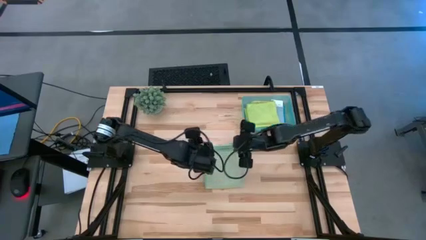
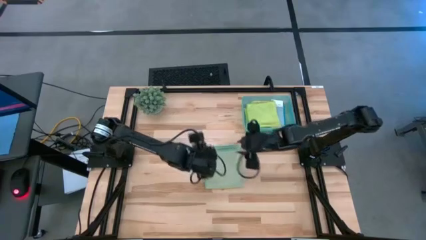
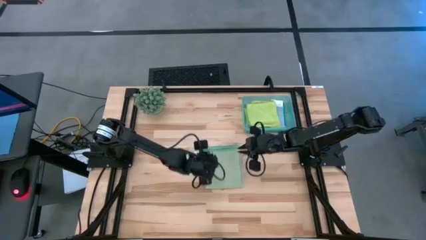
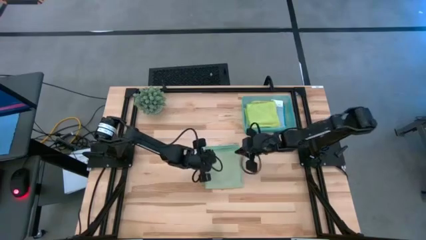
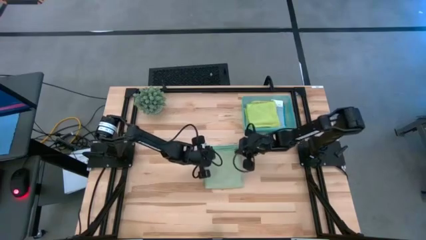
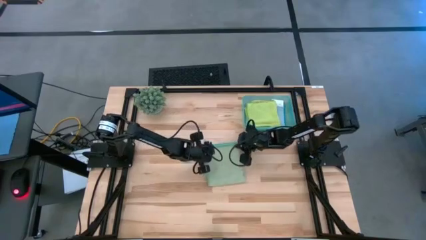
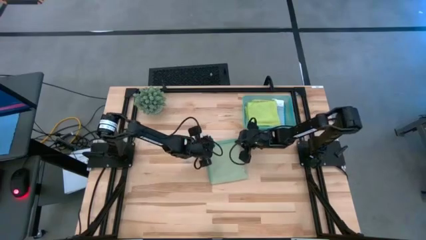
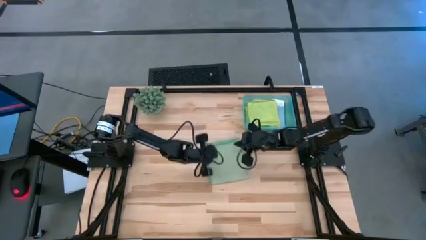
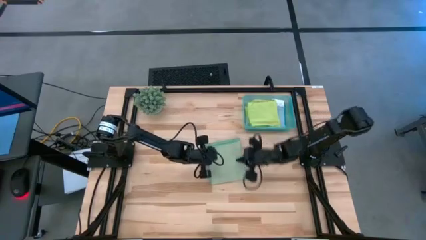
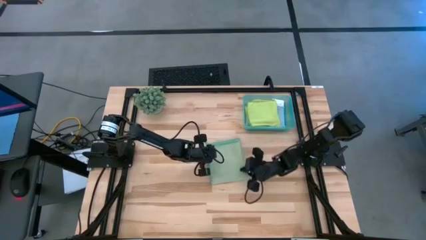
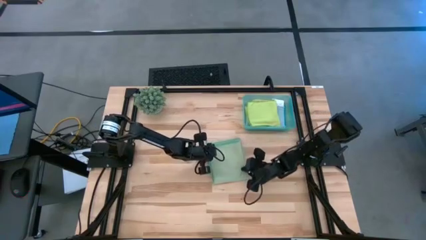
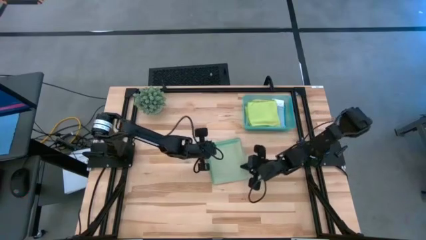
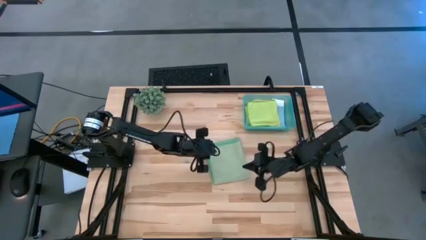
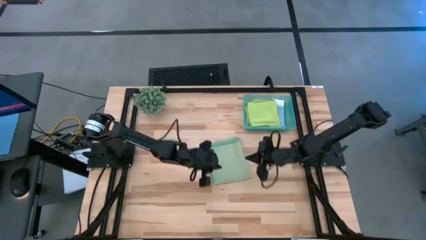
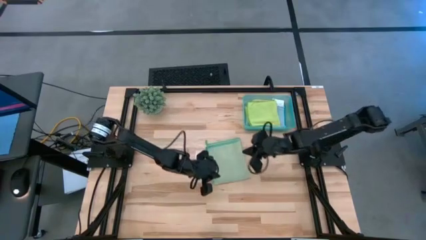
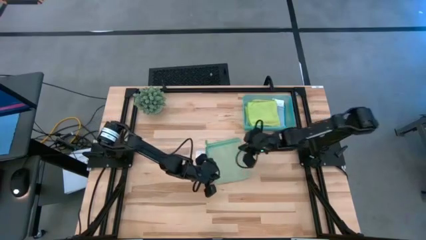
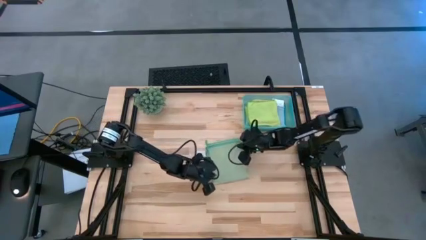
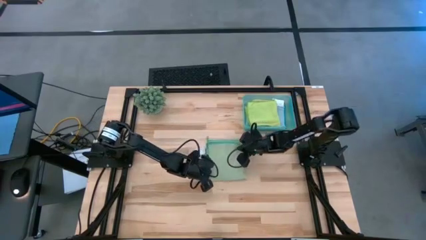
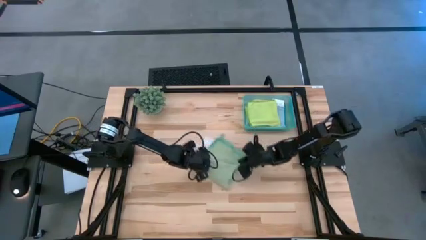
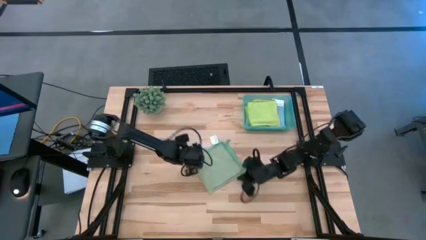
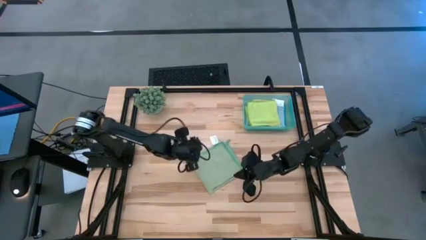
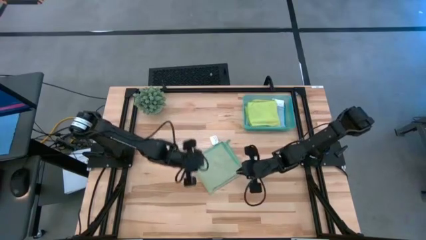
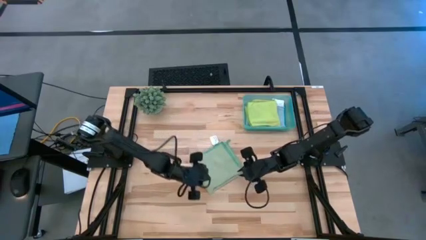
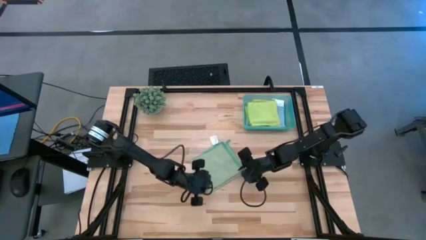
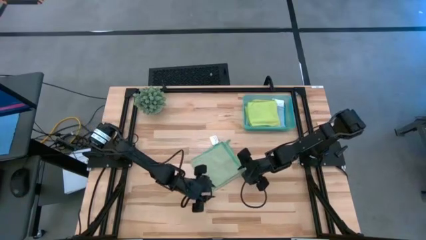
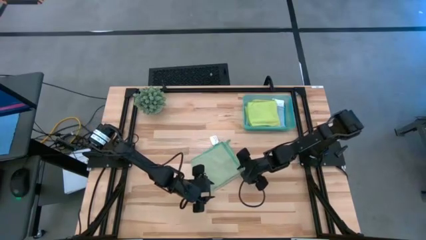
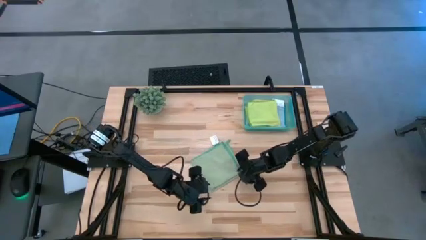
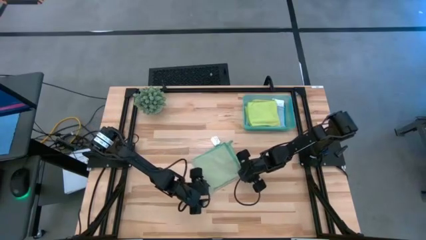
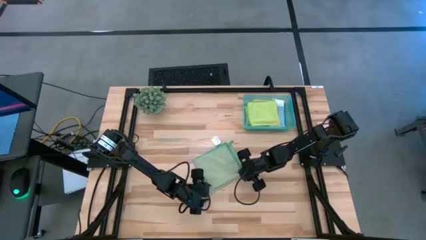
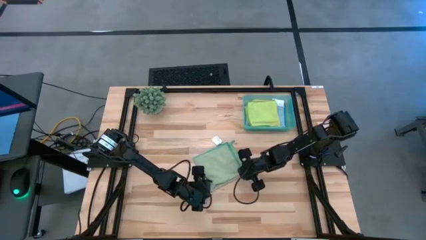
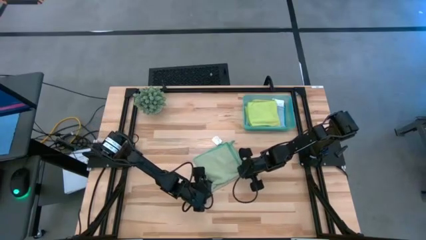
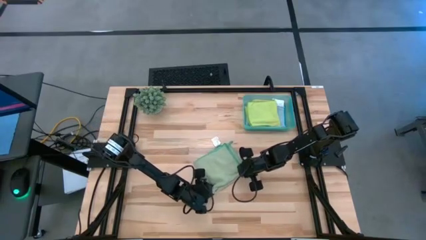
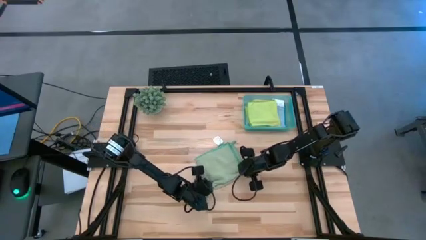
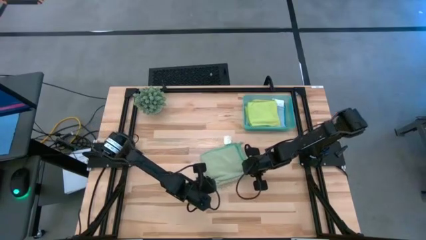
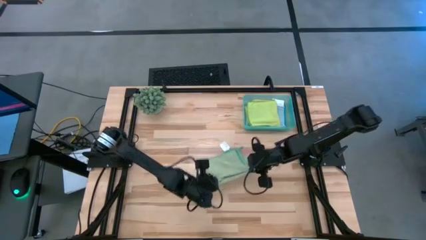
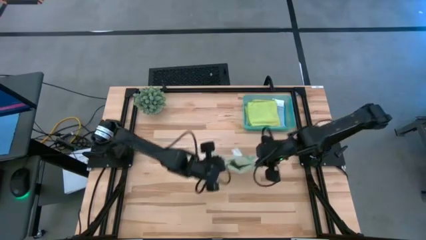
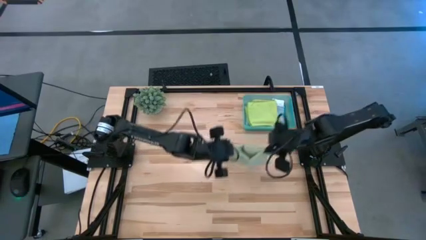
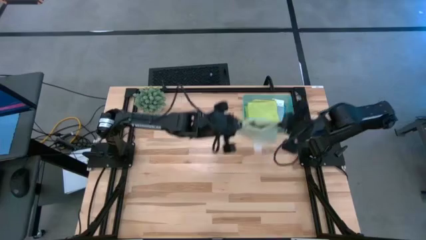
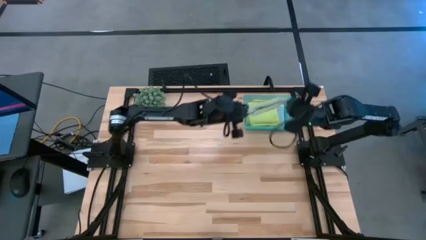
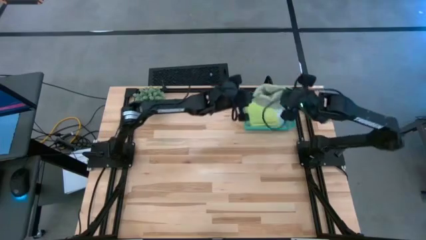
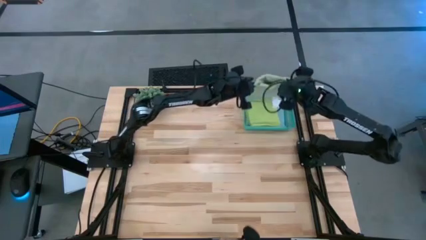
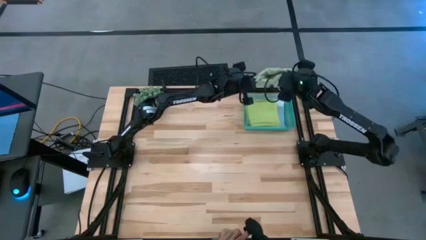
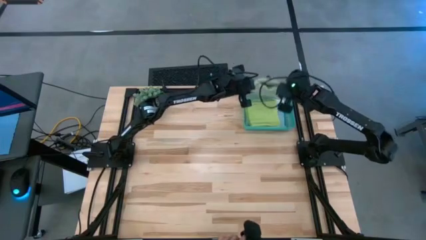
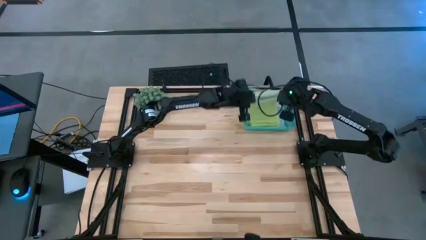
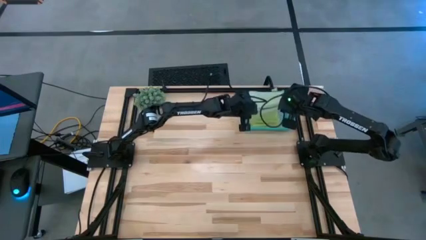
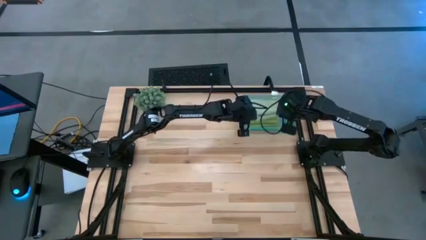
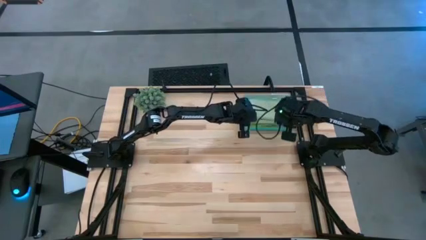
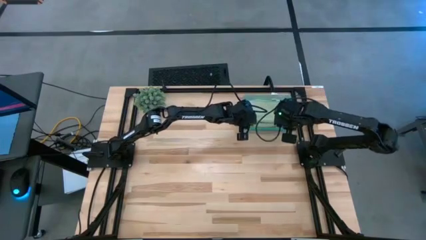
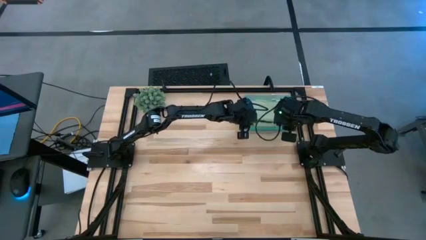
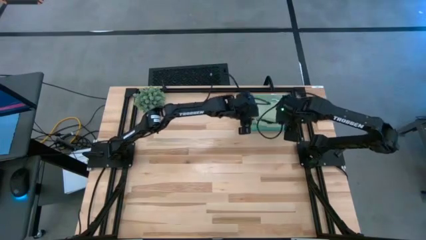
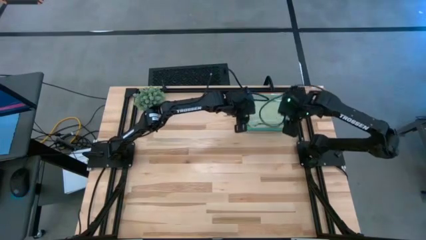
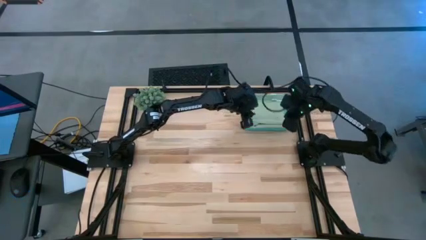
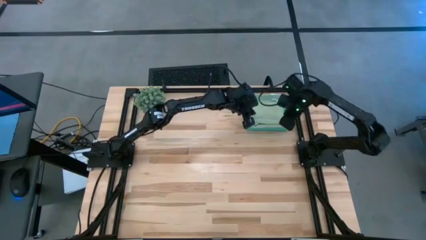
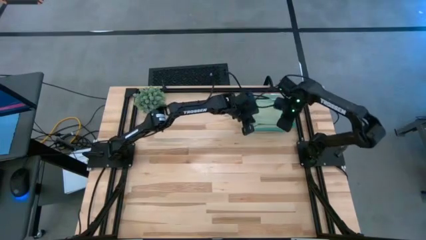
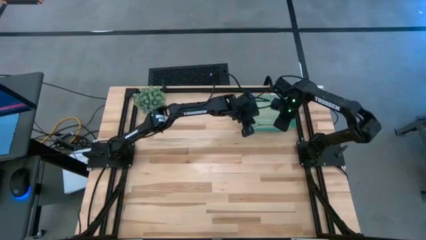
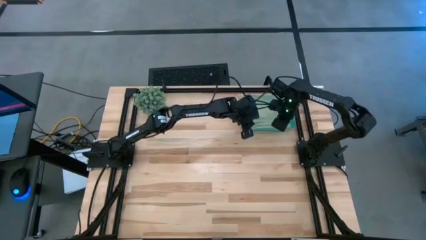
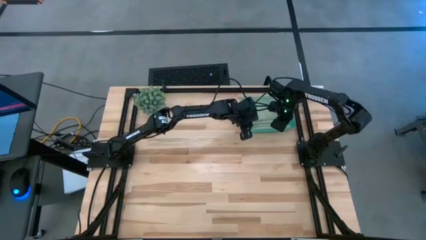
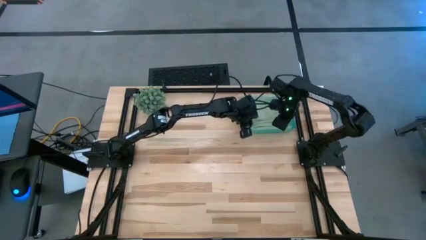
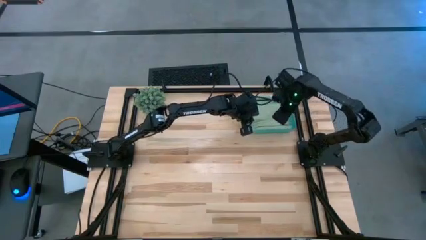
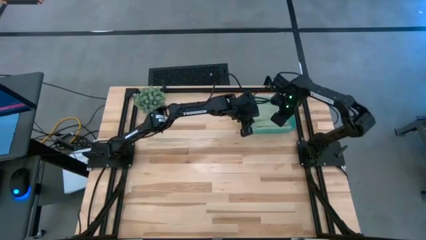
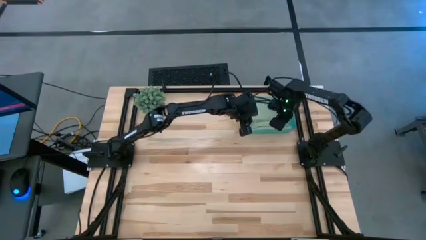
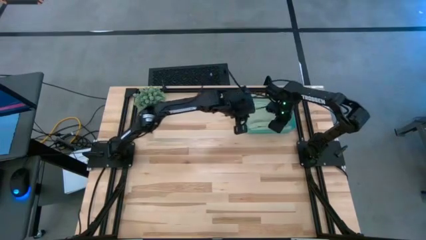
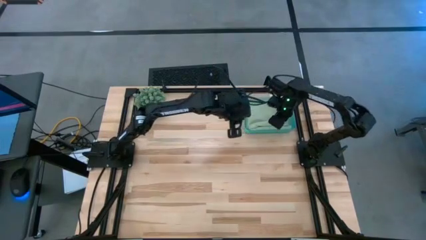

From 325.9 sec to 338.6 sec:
Task: Fold microfiber towels
Stack the light green microfiber cloth on top of the green microfiber in the blue bin

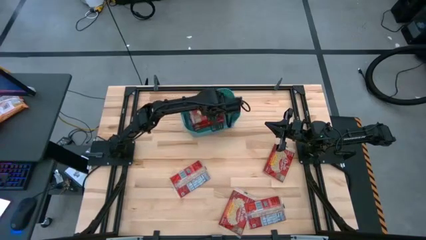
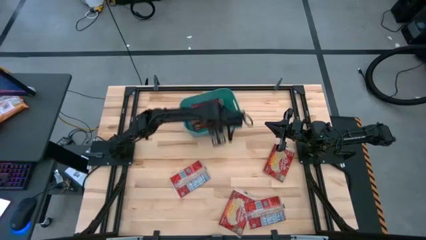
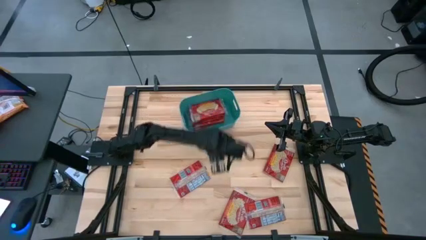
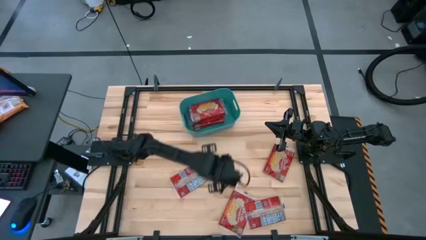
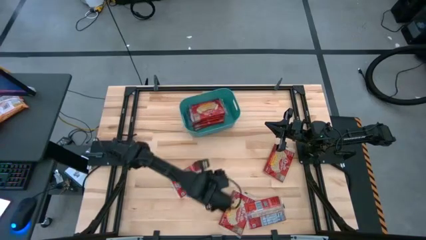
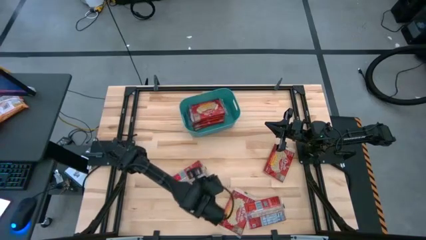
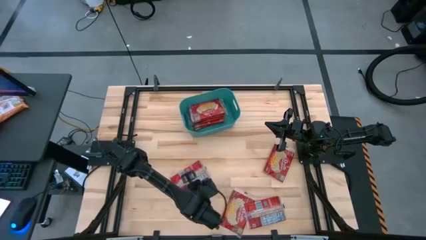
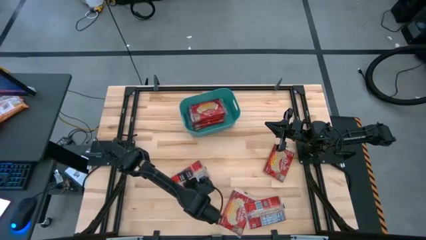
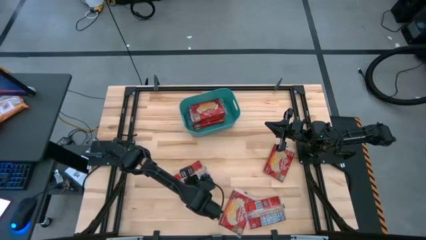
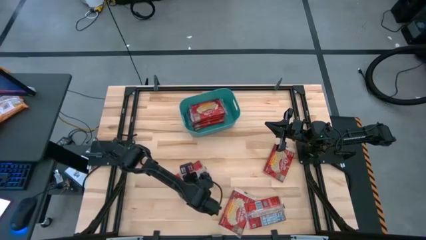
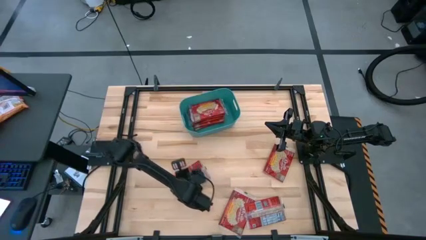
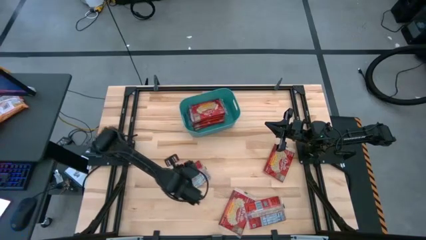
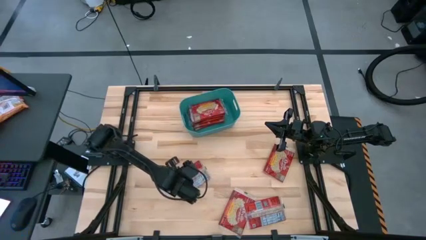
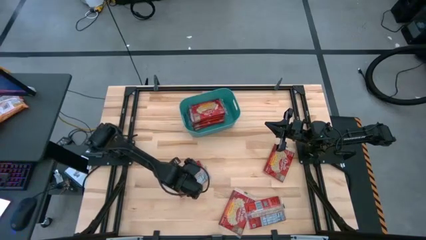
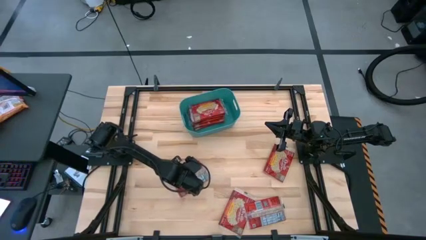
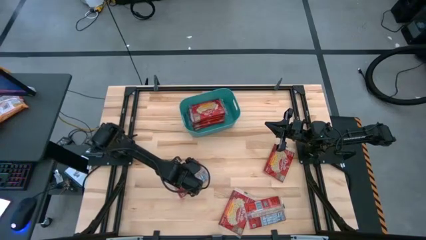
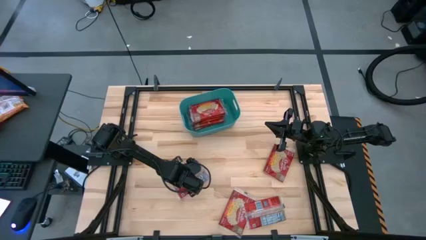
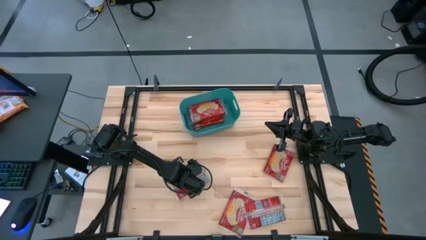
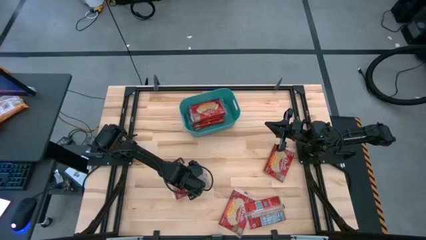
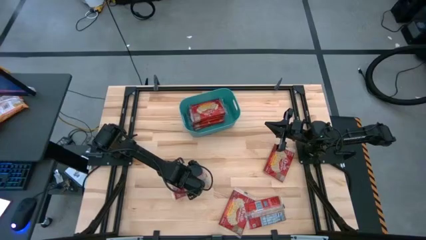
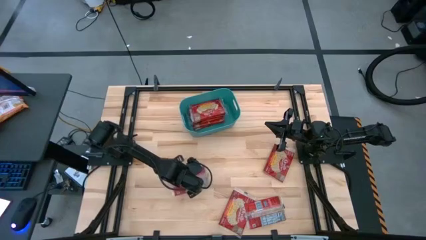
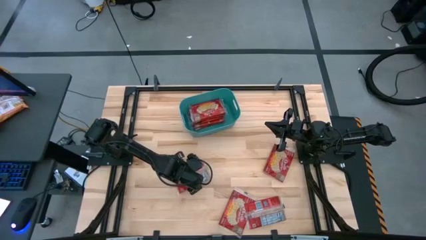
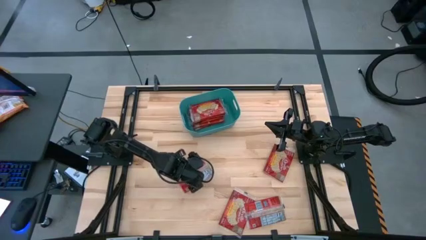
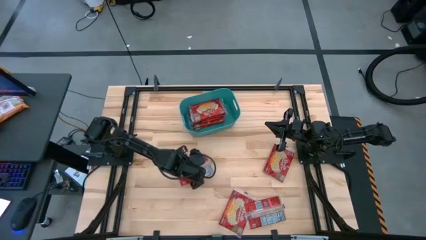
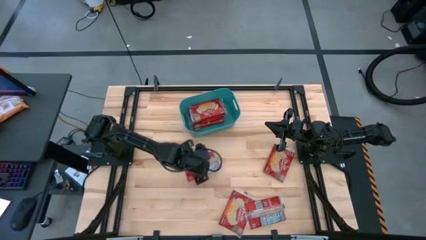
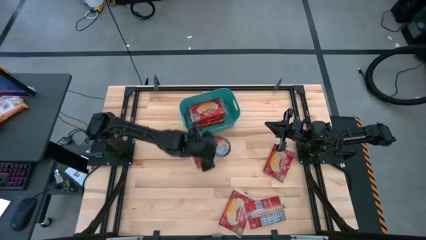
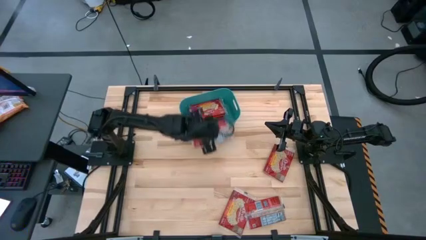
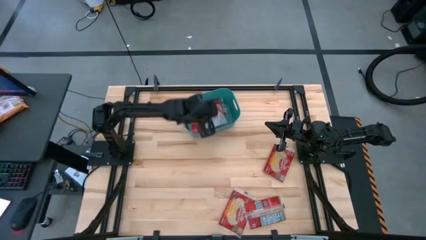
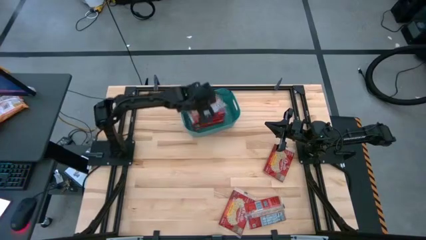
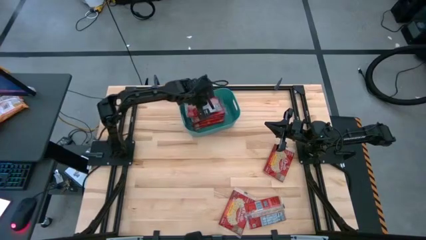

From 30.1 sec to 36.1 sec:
Task: Sort popcorn bags into baskets
Put the red popcorn bag into the green bin
